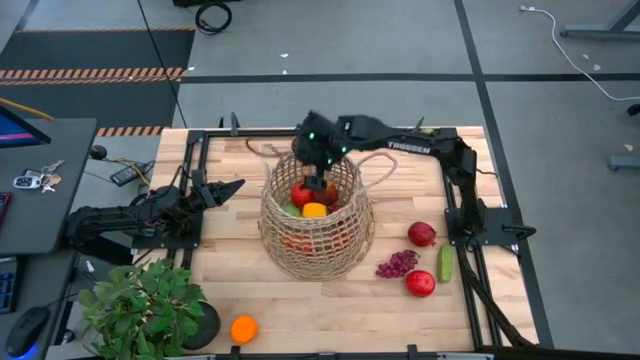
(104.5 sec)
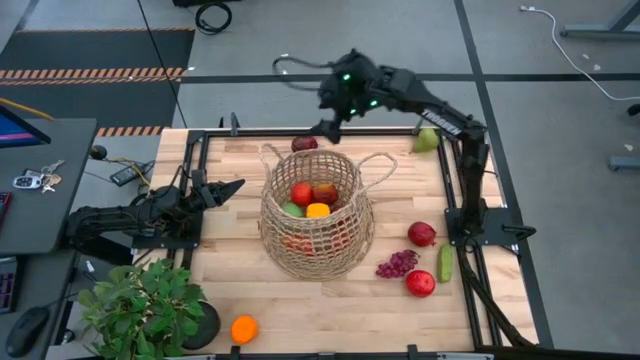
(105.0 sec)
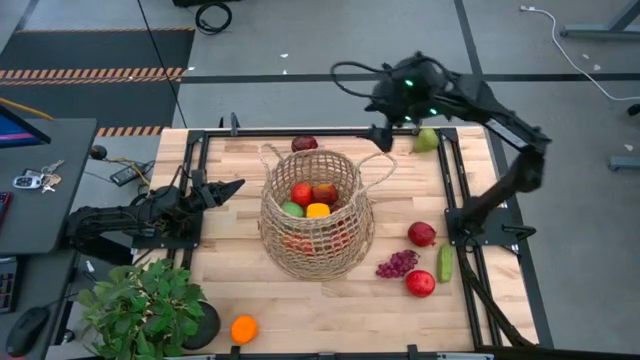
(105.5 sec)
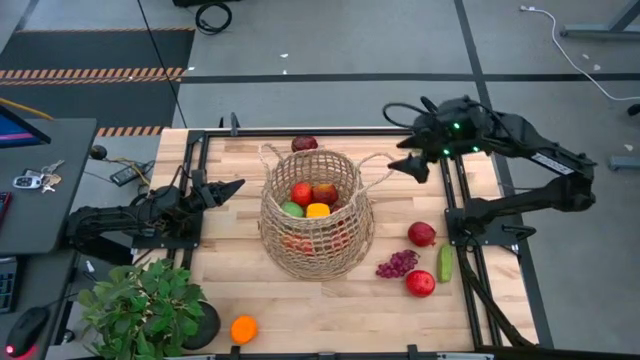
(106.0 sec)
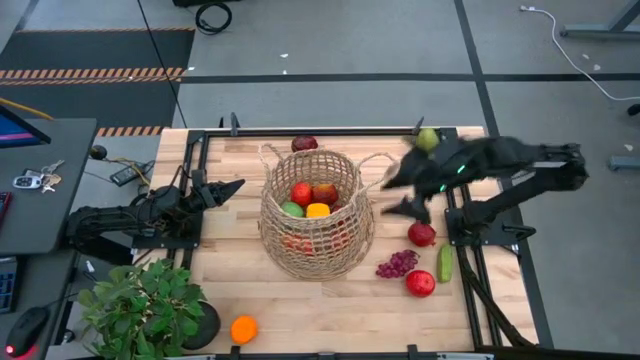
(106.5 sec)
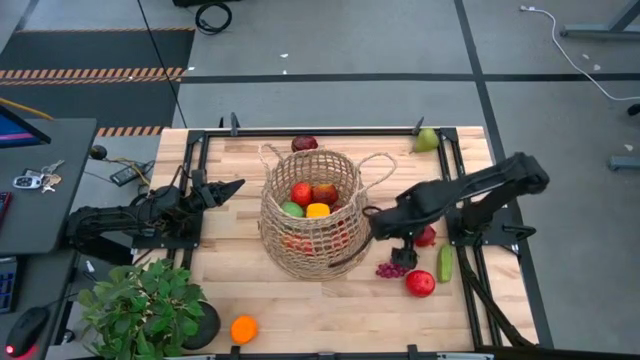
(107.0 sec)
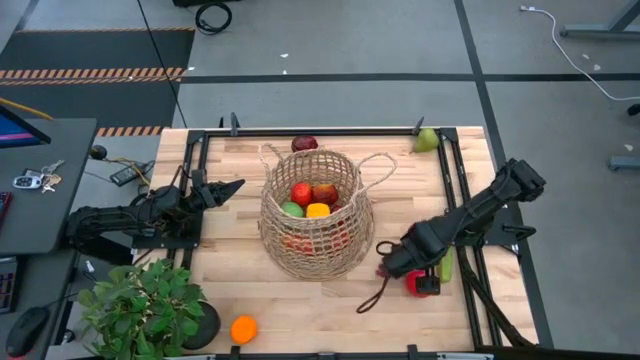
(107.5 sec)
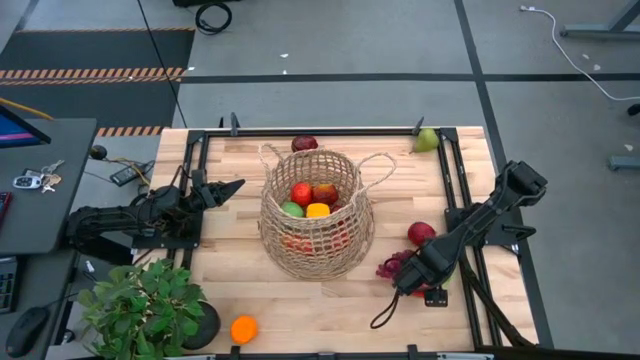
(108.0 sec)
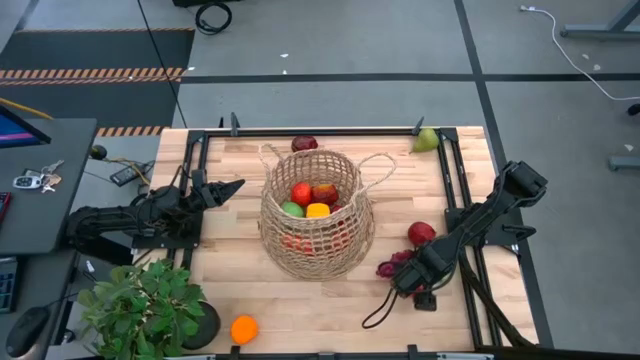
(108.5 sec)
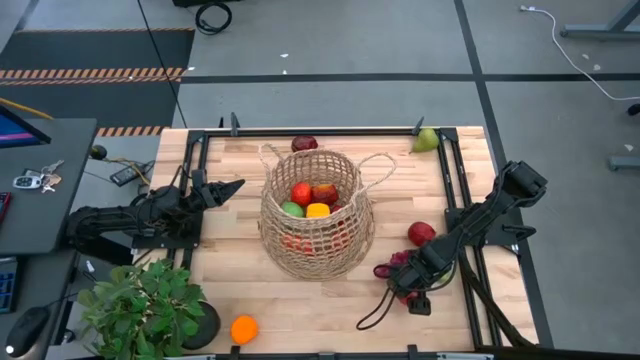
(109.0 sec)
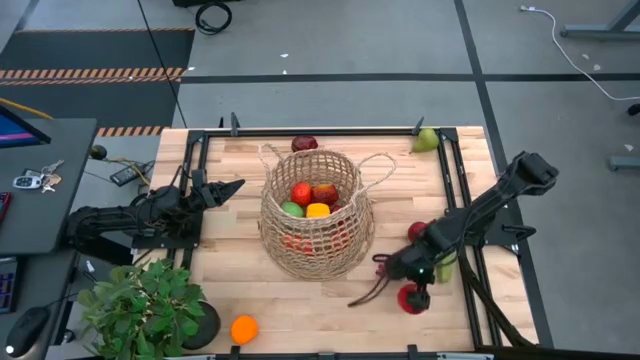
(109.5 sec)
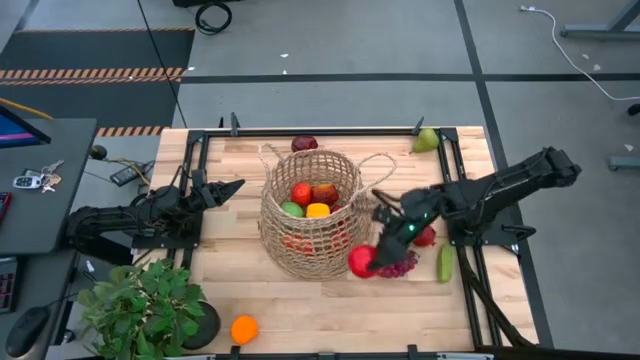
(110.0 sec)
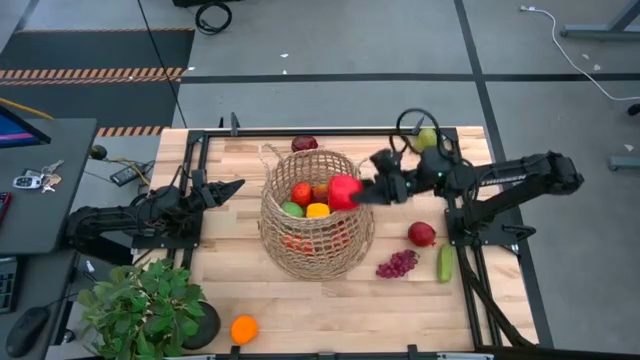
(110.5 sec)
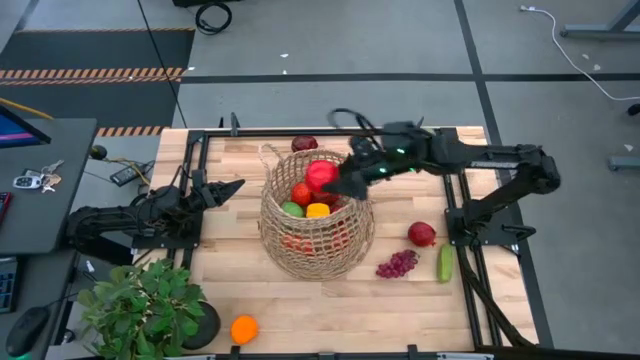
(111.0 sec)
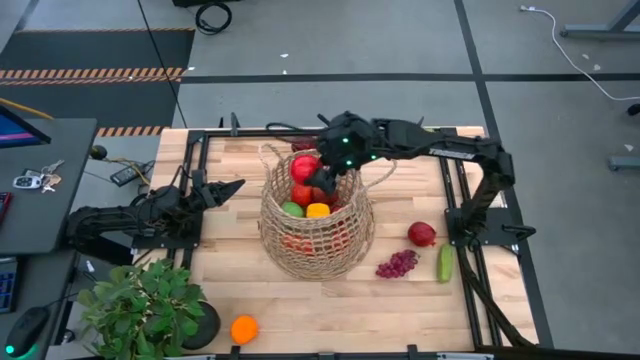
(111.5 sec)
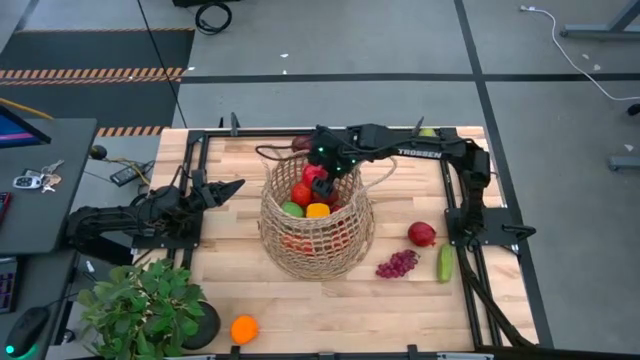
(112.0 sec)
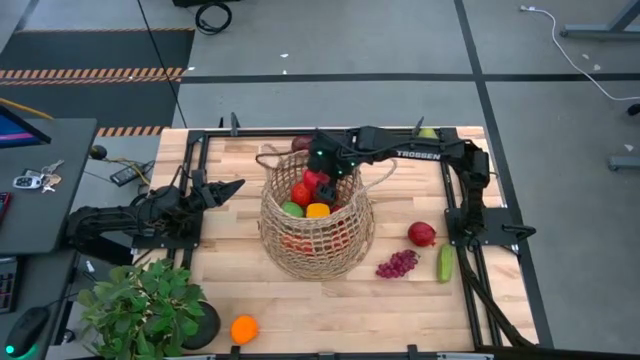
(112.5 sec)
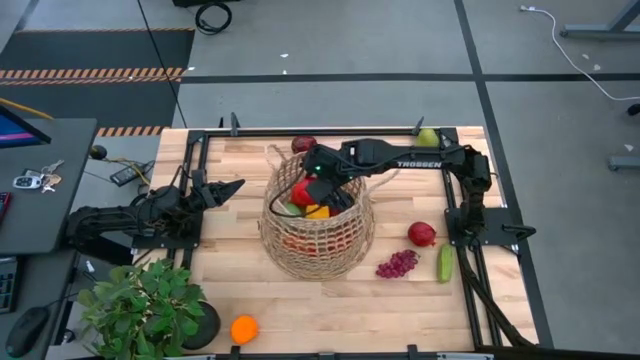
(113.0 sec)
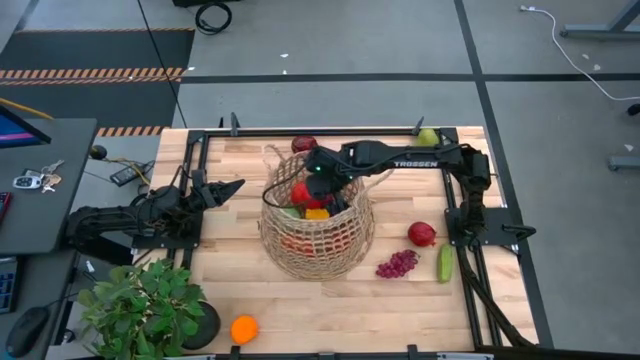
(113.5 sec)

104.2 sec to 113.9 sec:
Task: Build produce basket
Put the red apple into the basket

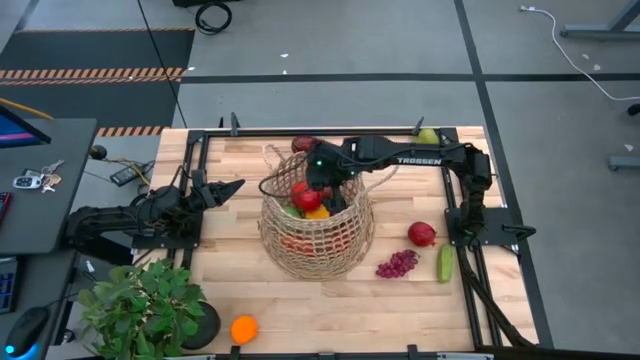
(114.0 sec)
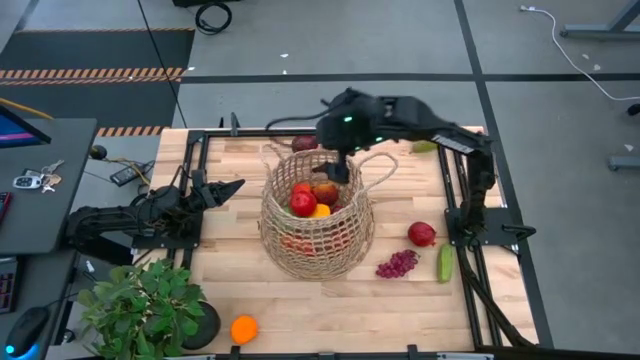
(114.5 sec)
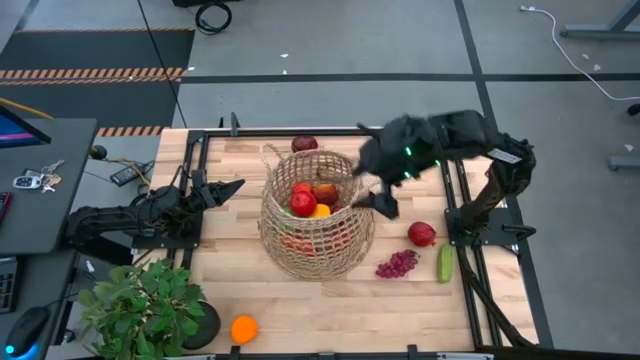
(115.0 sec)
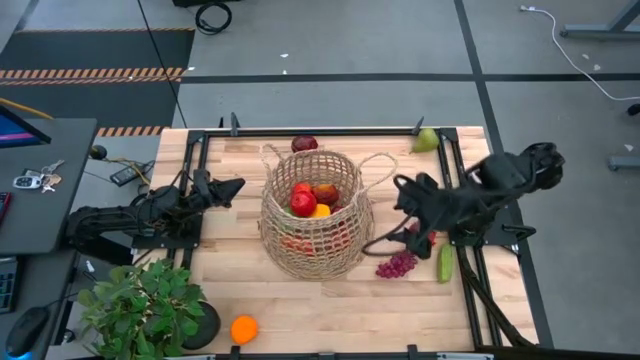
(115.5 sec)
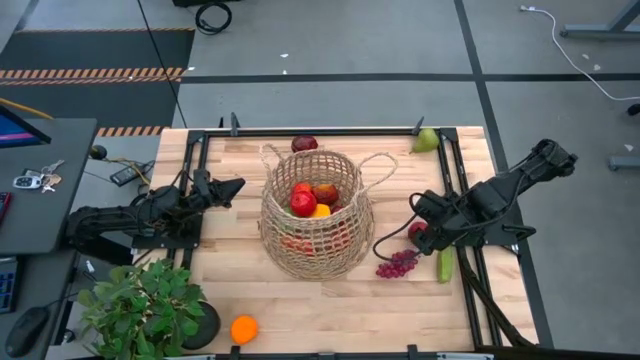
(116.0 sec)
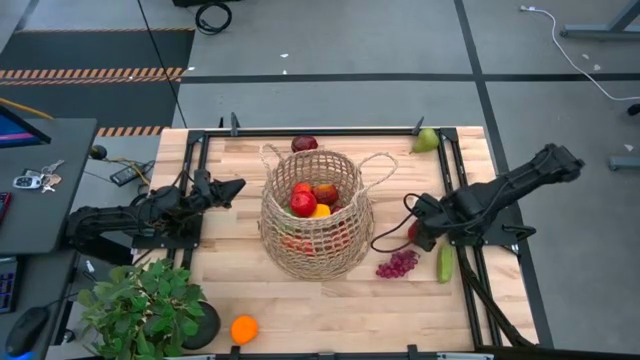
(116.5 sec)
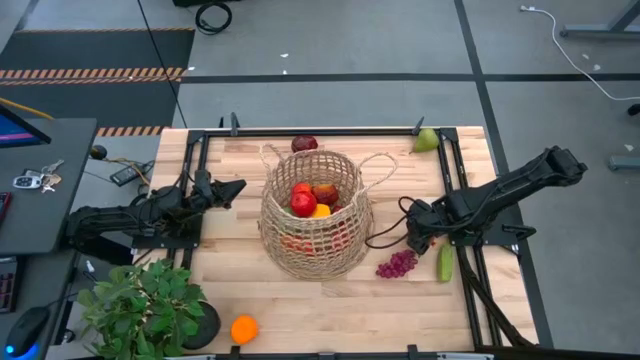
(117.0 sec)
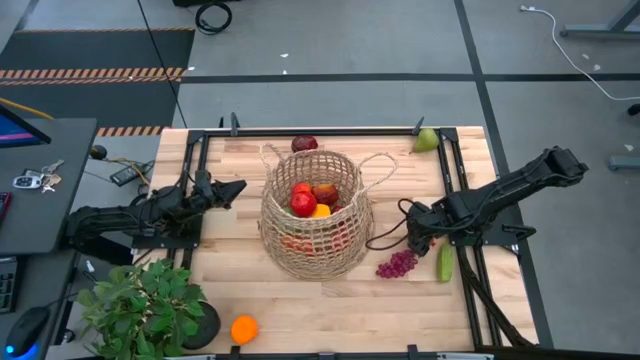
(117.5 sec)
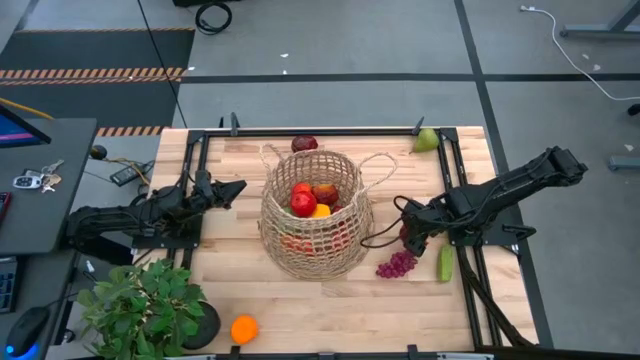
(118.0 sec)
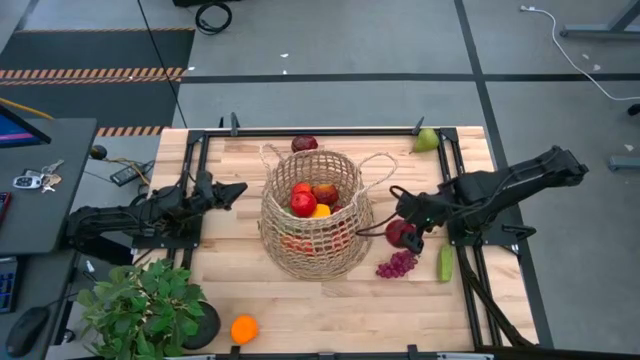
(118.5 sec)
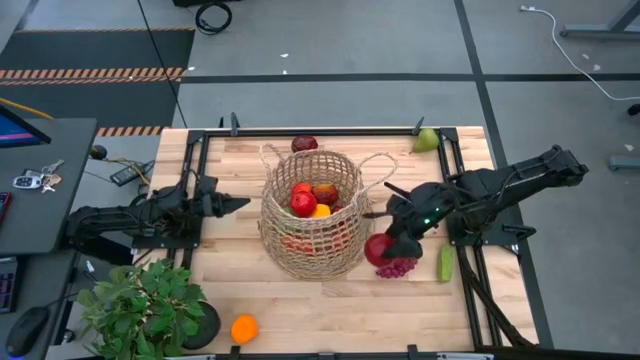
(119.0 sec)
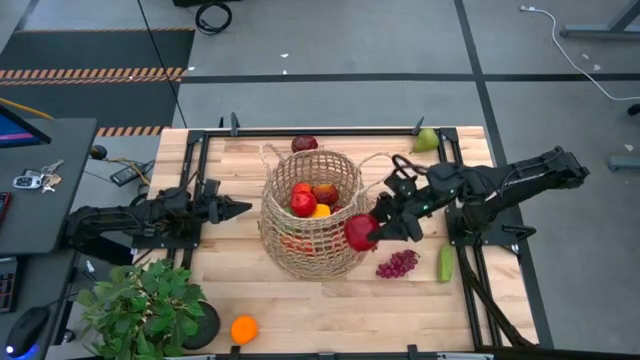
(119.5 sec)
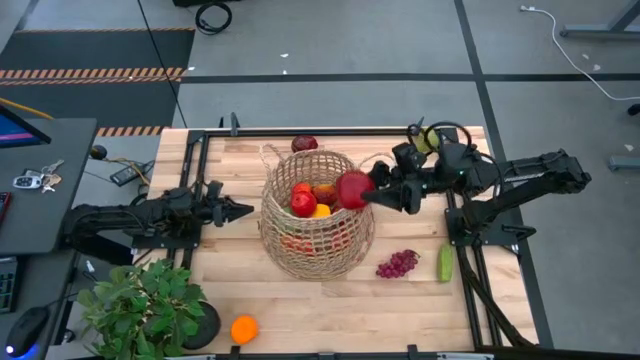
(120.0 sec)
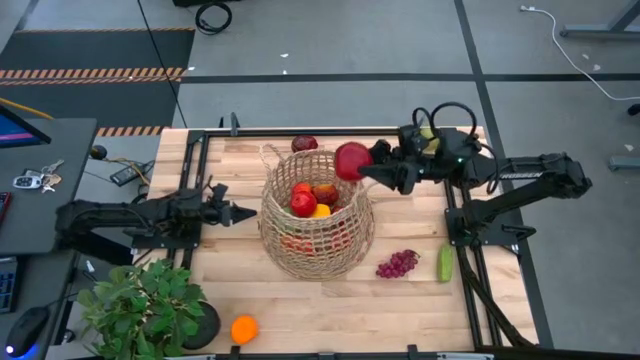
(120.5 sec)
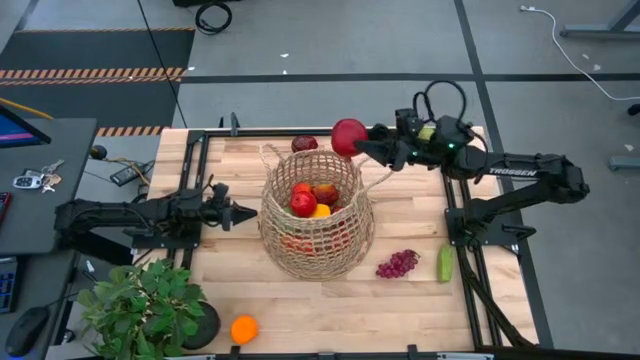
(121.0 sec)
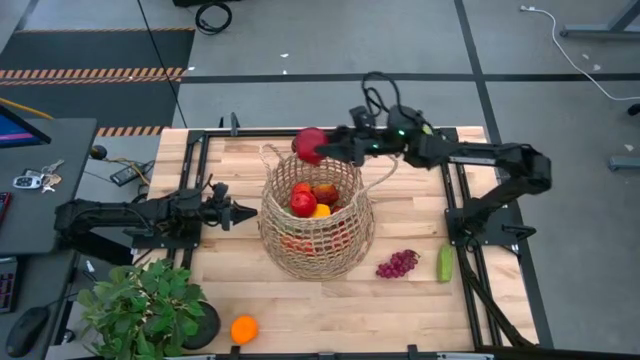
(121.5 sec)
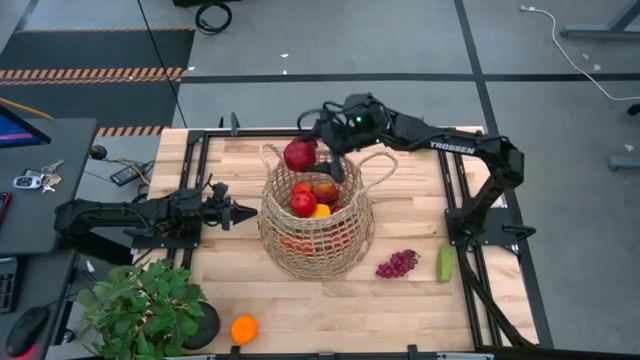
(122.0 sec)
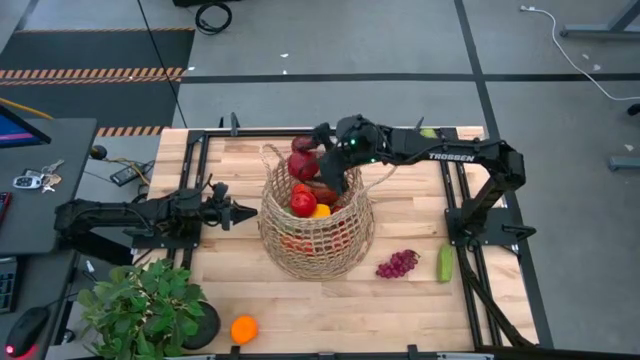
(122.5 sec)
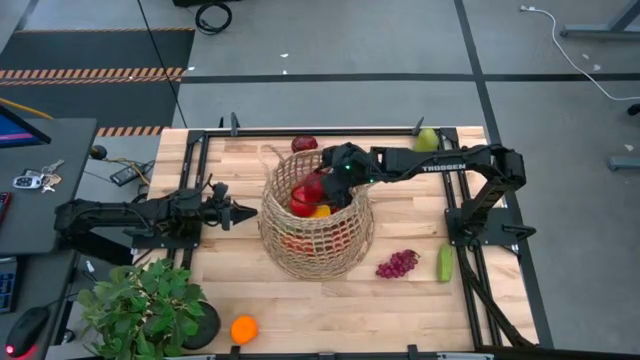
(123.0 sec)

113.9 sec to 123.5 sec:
Put the red pomegranate into the basket

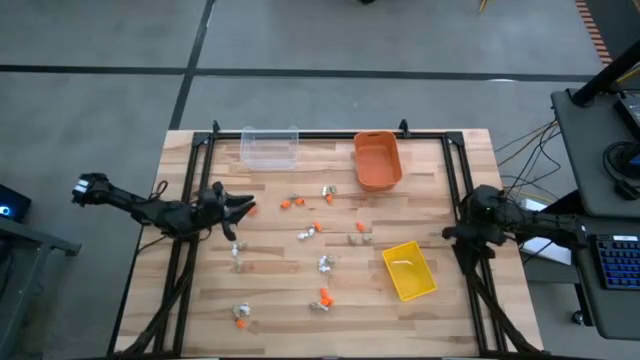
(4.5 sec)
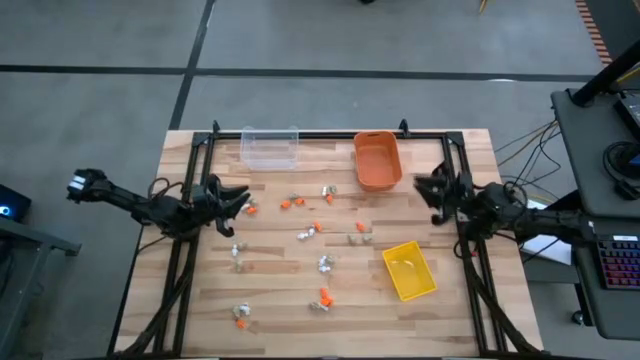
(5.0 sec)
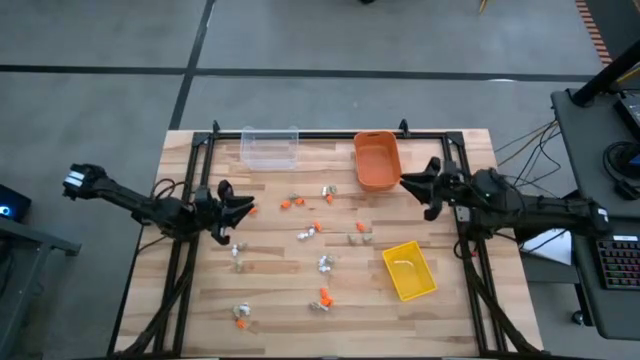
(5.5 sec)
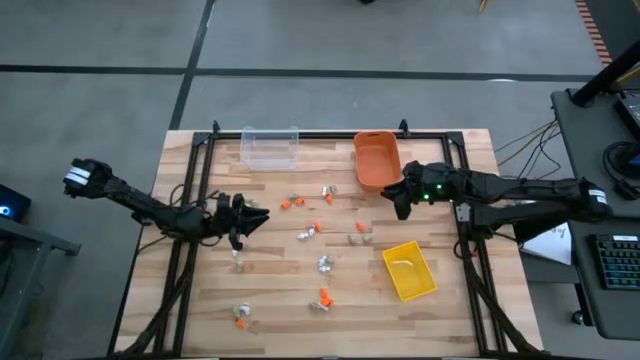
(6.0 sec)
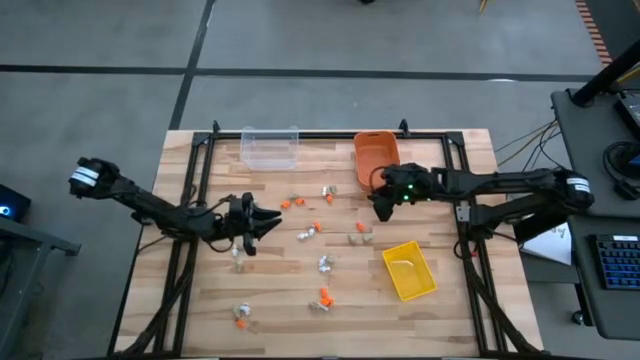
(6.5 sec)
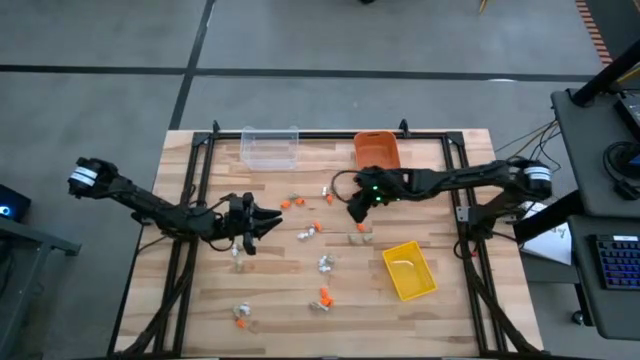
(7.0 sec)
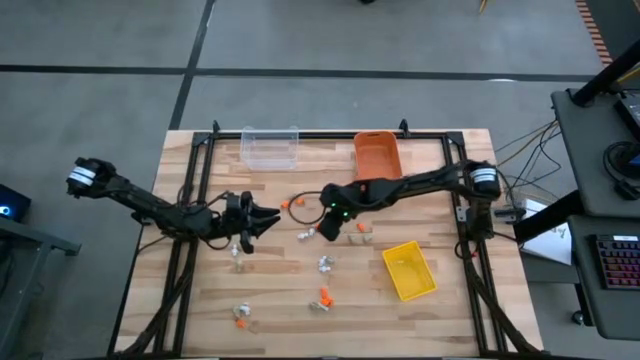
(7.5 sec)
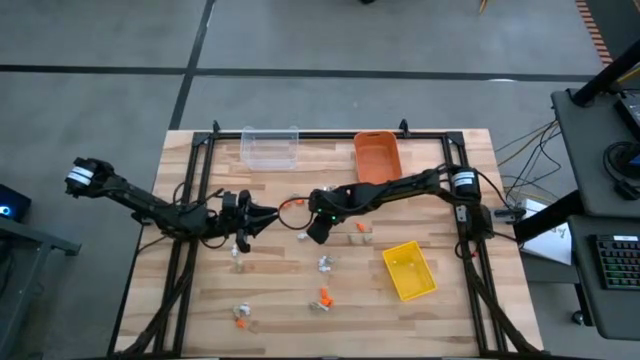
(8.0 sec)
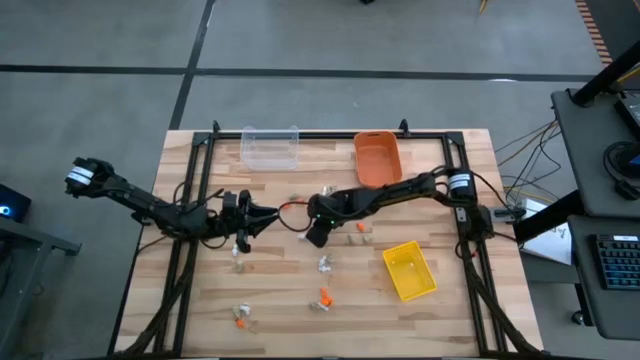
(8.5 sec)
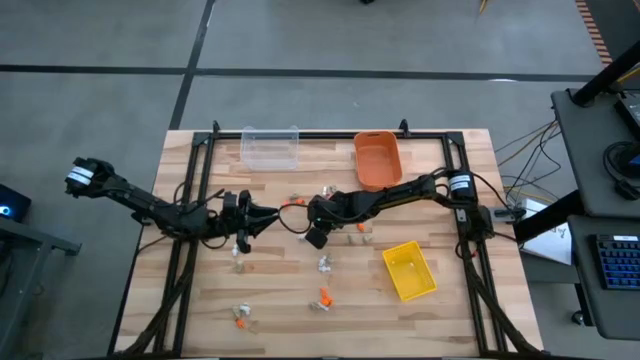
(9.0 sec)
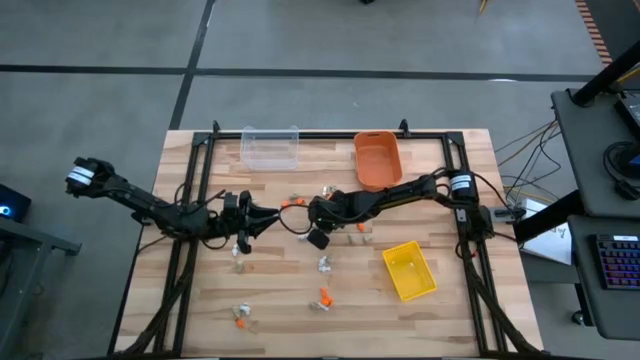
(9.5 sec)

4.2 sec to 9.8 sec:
Task: Sort Halloween decoration
Put the orange skeleton toy into the orange bin
